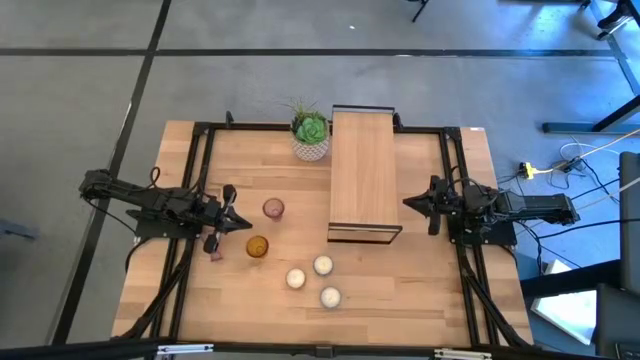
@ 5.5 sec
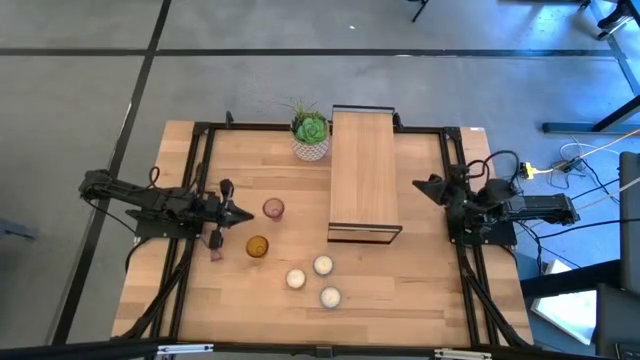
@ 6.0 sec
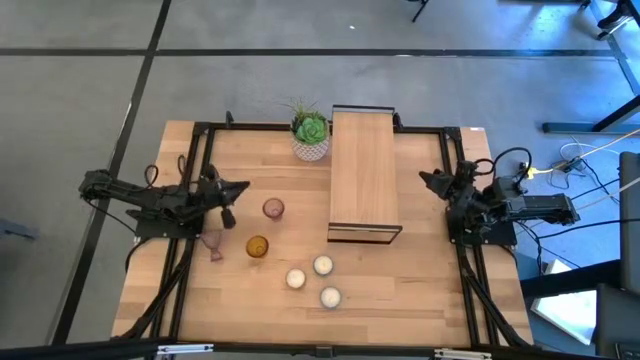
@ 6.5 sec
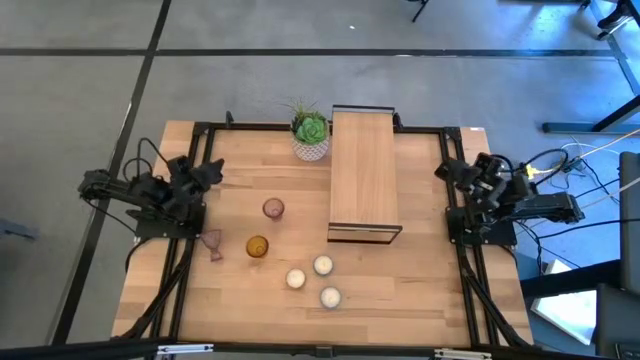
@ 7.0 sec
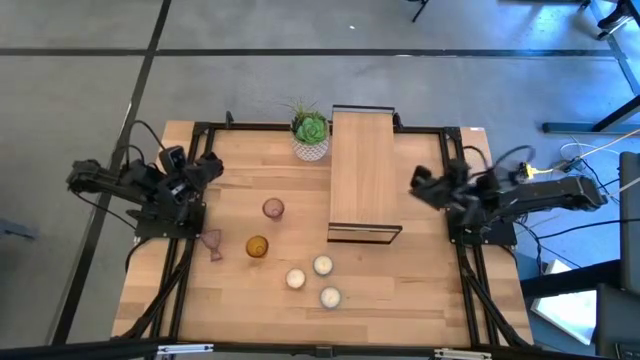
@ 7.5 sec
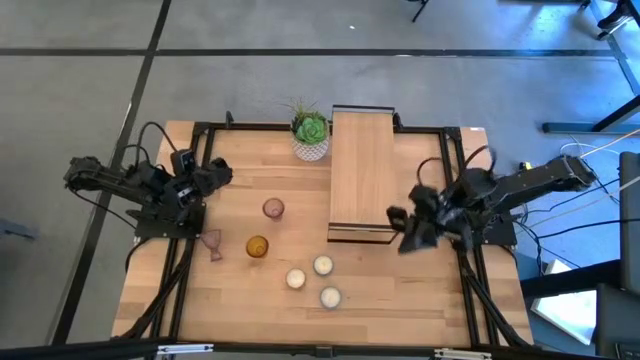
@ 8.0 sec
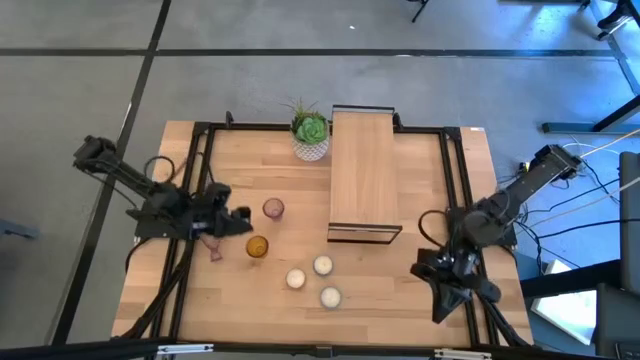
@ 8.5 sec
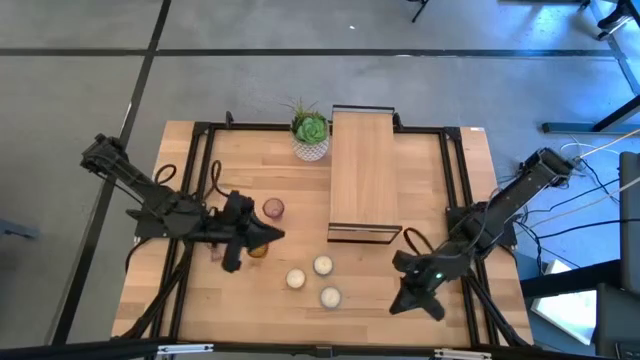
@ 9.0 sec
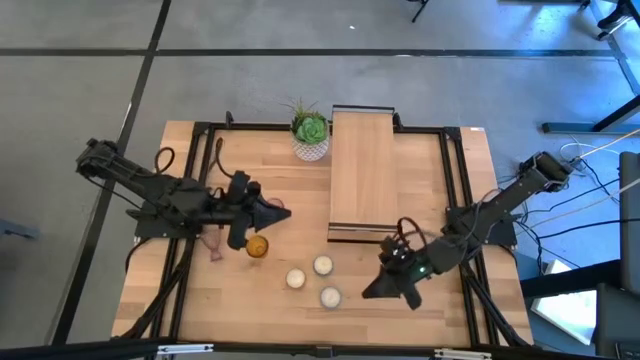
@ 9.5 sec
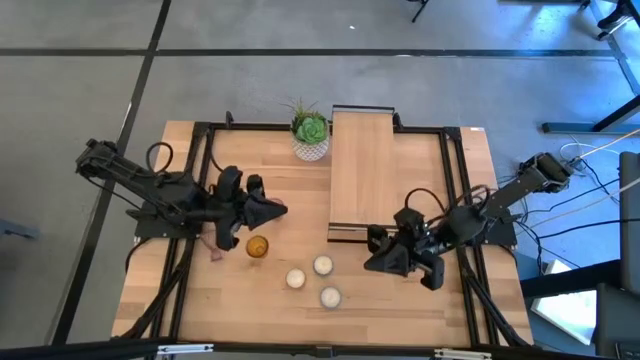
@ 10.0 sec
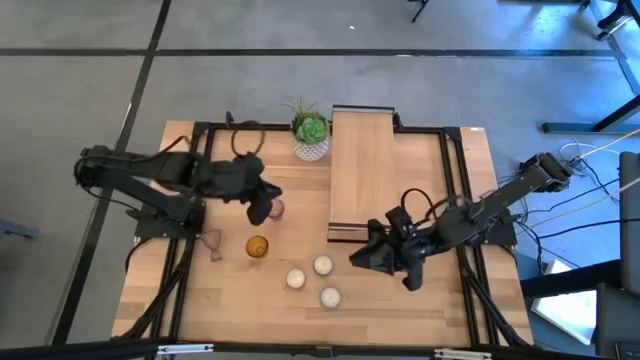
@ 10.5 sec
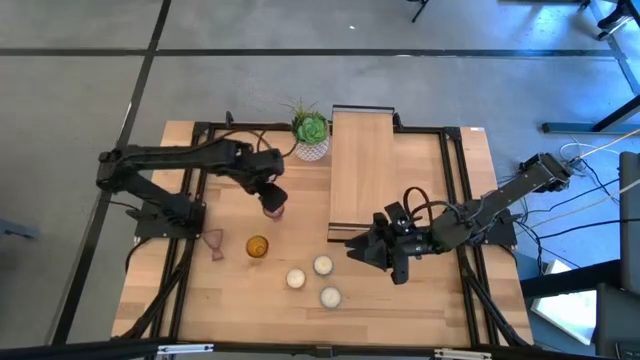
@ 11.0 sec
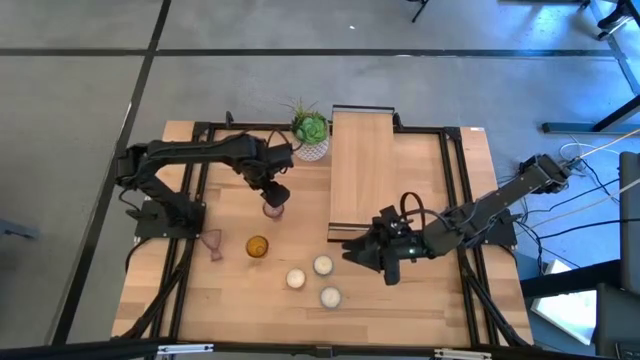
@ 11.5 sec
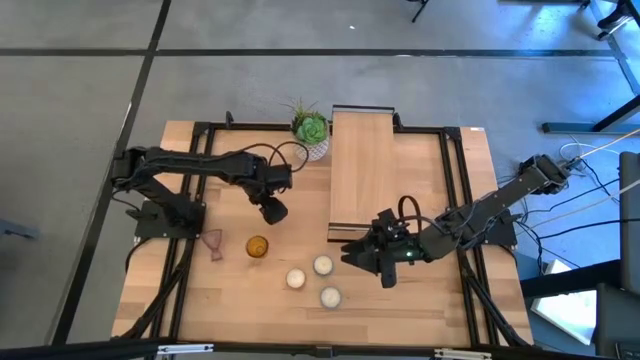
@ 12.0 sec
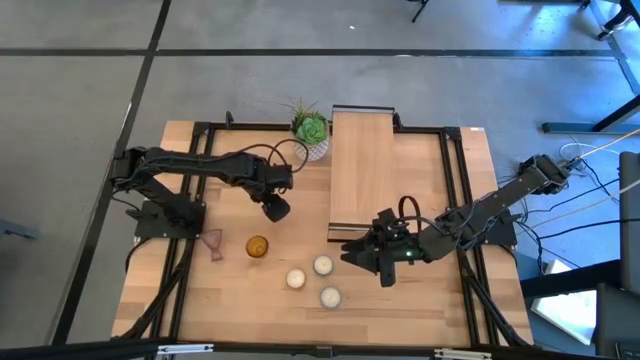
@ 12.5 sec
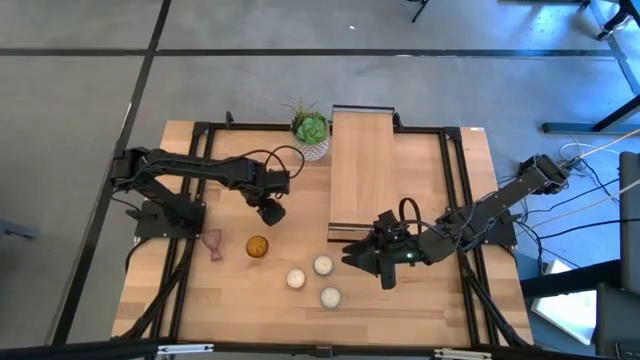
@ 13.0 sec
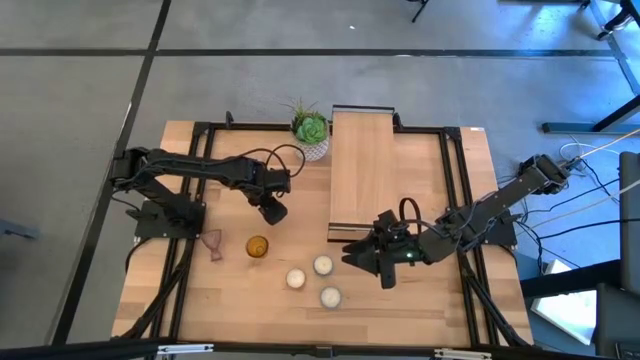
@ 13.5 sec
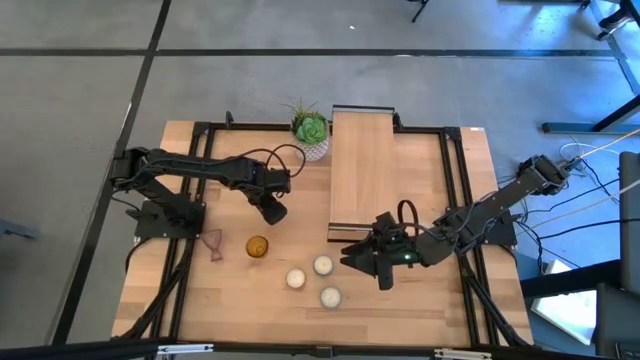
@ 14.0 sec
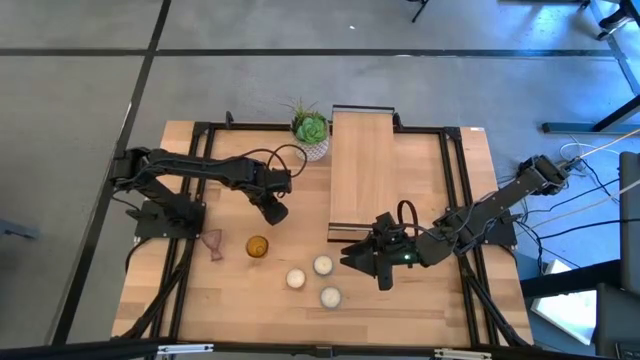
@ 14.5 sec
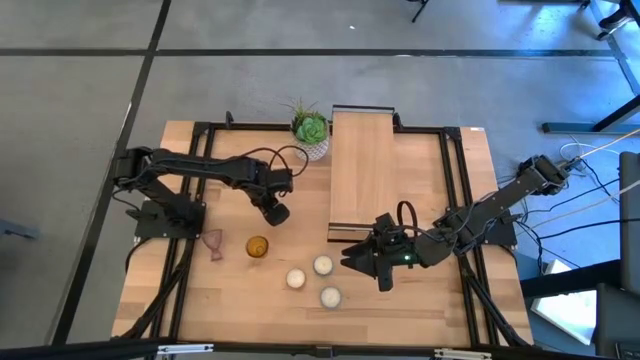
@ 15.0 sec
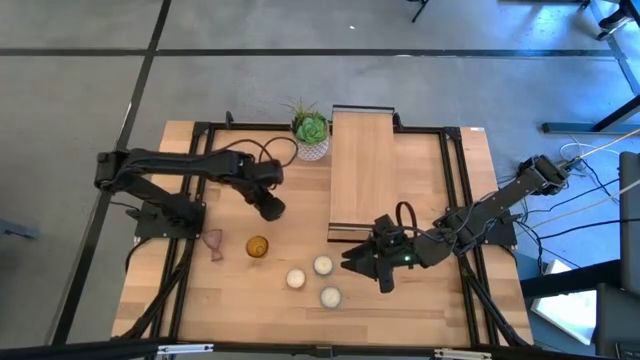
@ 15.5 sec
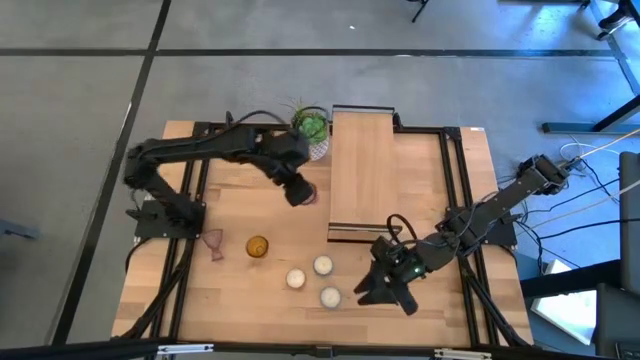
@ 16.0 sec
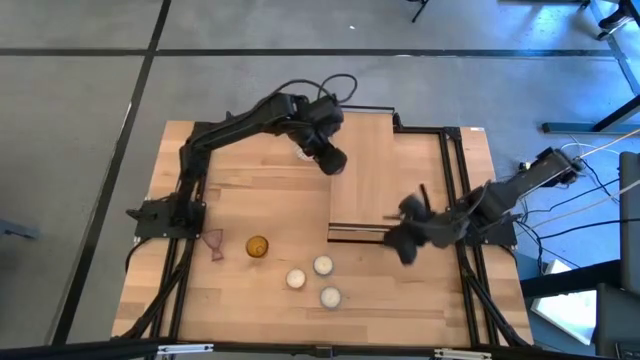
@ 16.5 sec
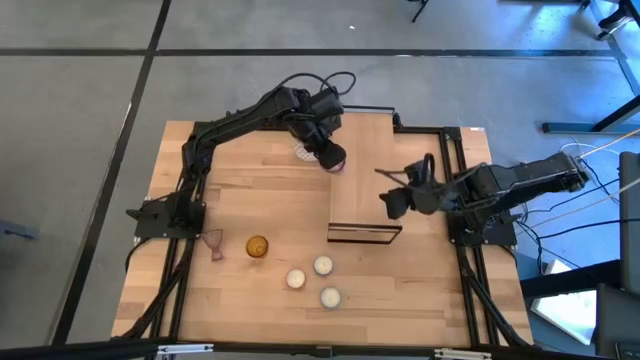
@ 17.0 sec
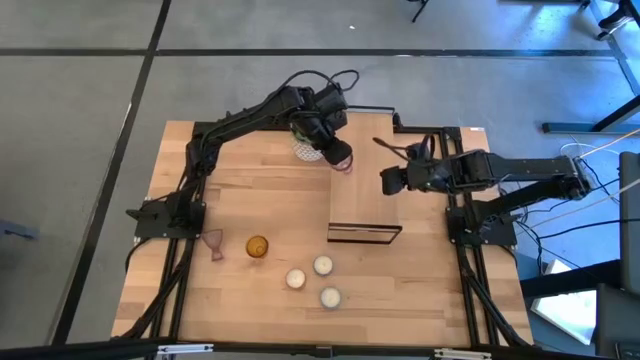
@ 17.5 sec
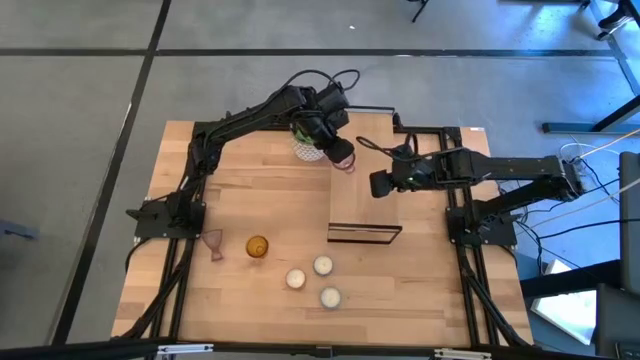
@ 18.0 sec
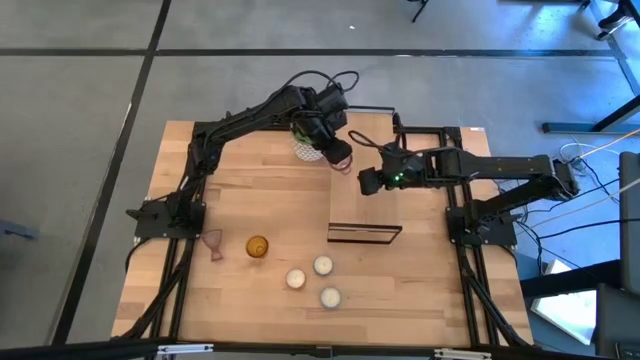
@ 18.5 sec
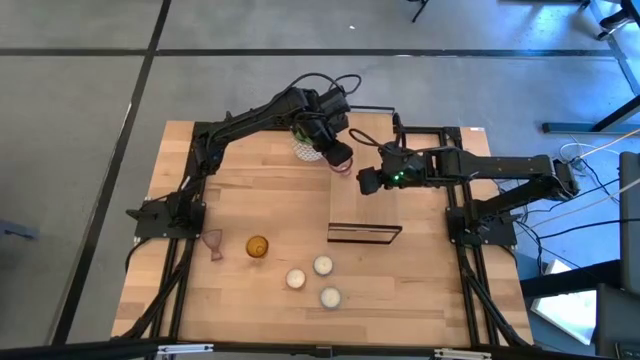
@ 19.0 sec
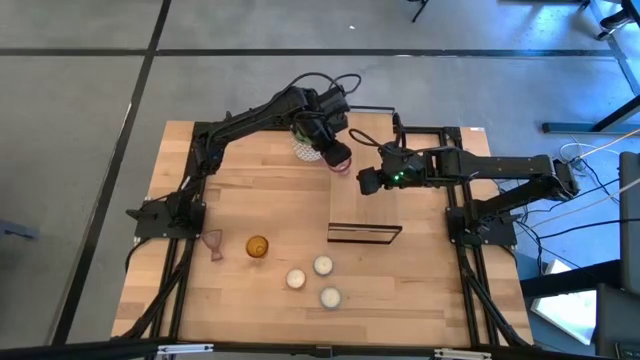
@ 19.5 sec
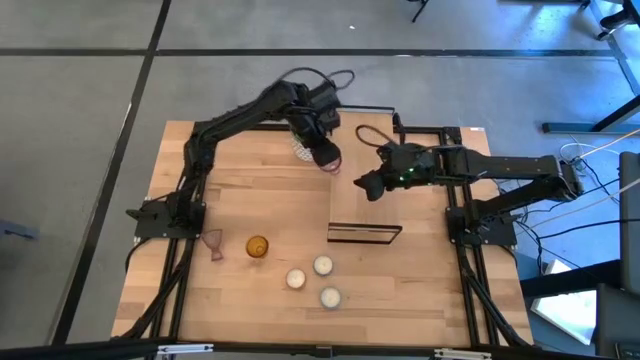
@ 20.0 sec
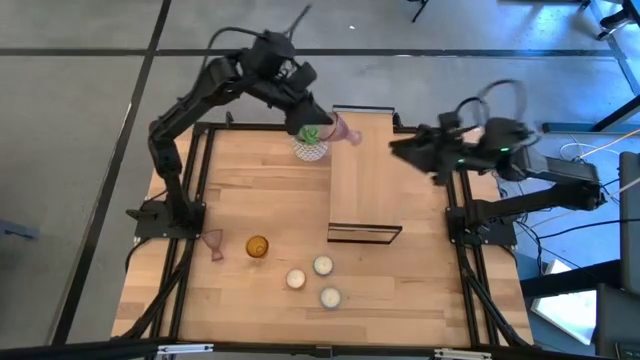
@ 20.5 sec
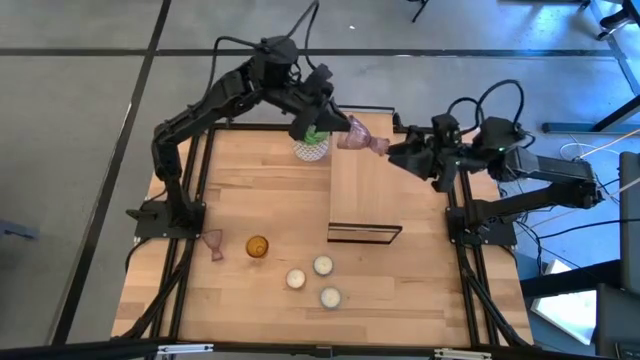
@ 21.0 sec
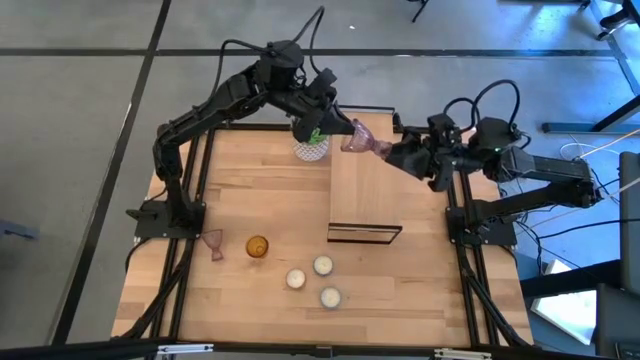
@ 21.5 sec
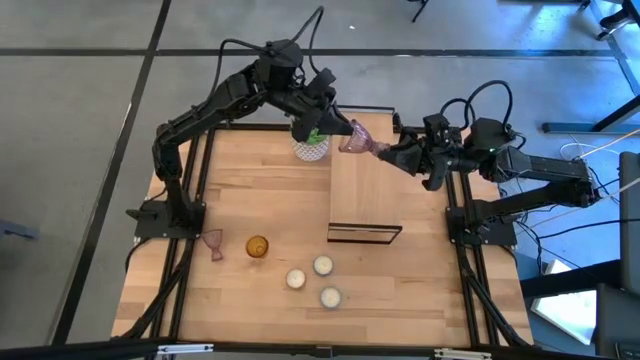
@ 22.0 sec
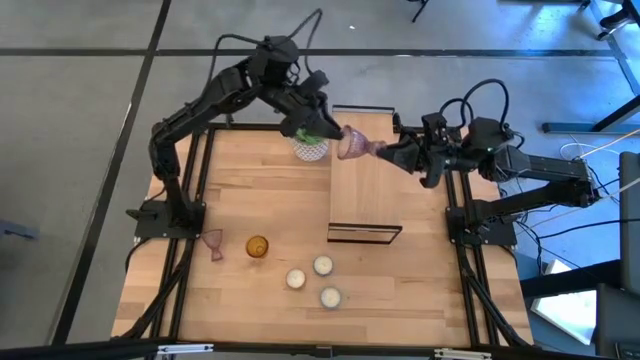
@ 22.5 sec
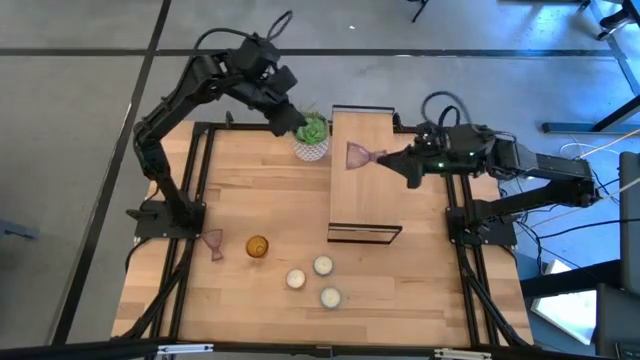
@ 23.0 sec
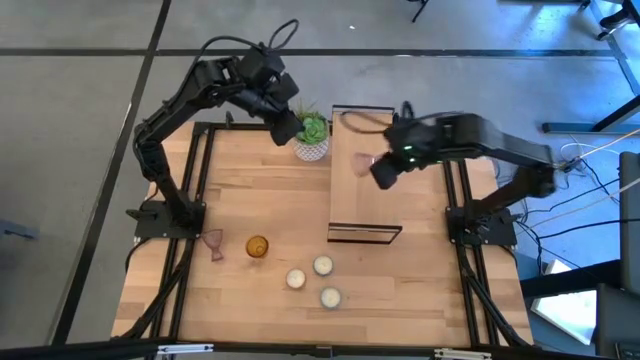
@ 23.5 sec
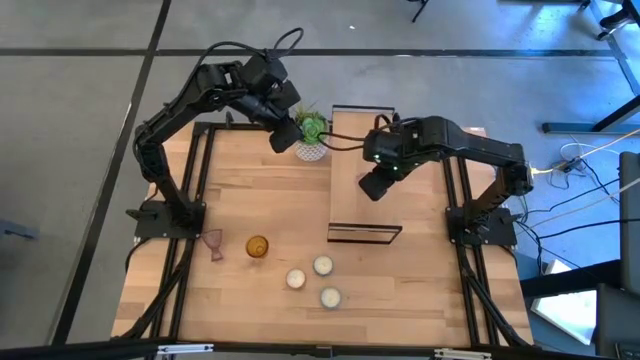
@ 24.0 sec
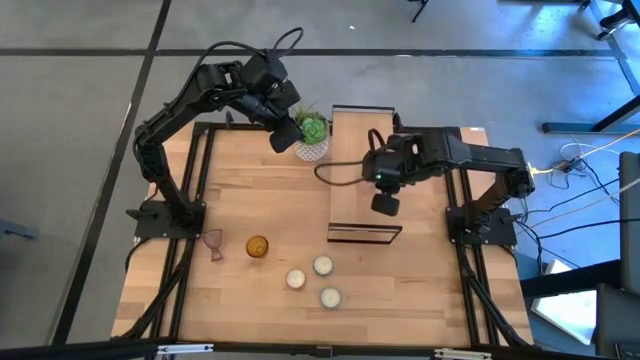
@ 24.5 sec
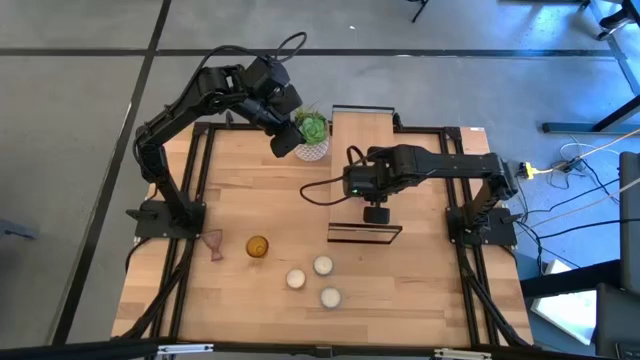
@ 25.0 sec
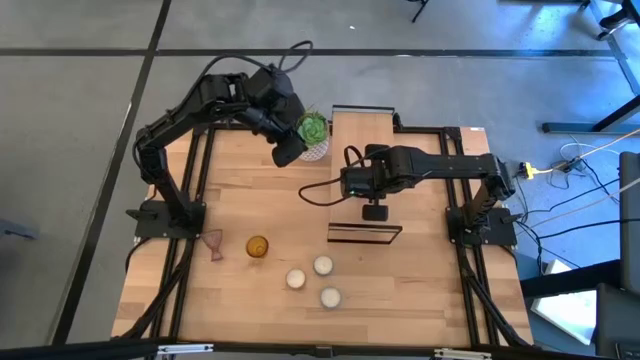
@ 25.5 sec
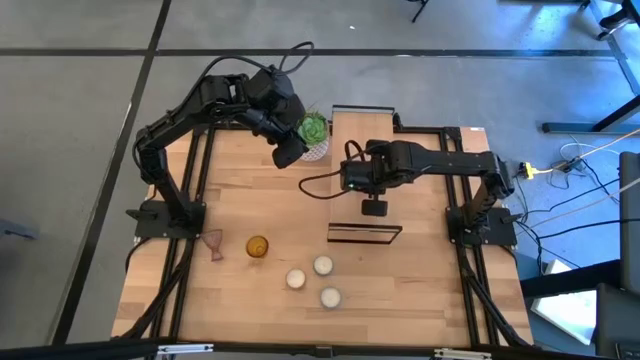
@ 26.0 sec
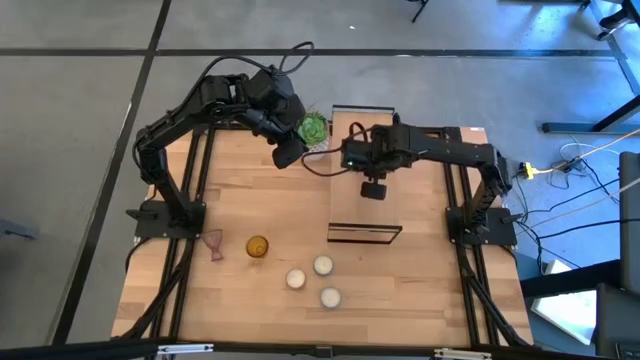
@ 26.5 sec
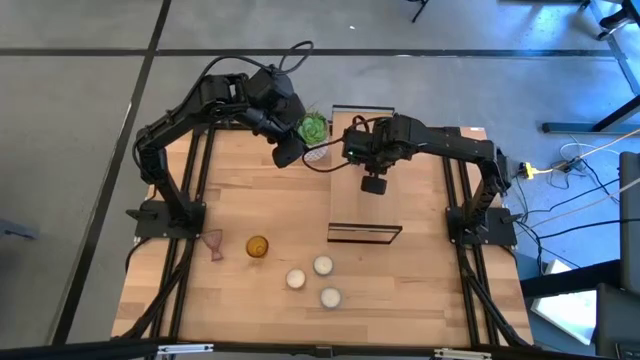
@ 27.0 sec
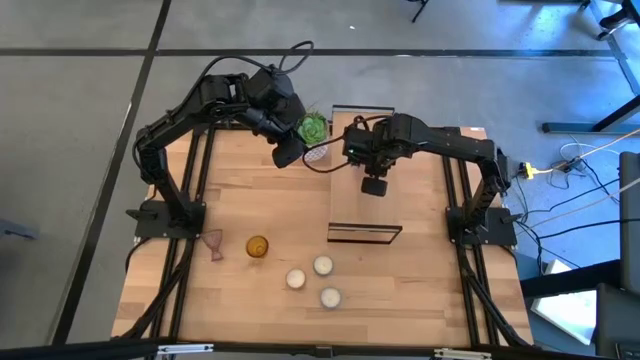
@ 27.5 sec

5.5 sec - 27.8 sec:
Task: Pick & Place candle stick holders
Put the top pink glass candle holder on the shelf
